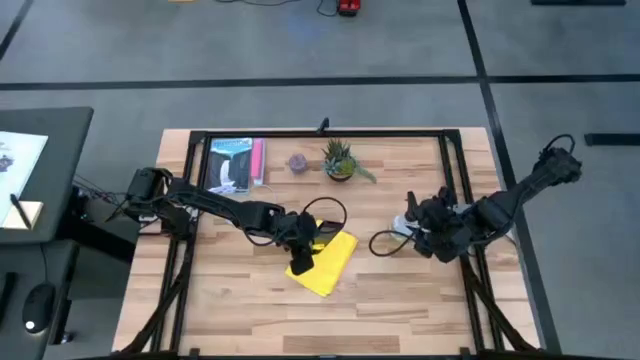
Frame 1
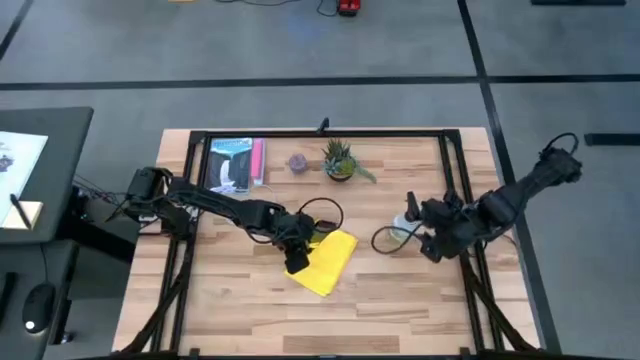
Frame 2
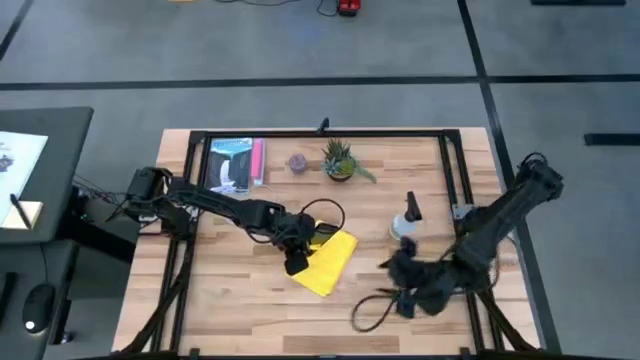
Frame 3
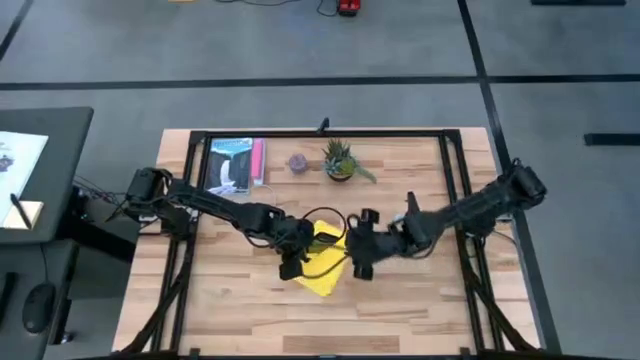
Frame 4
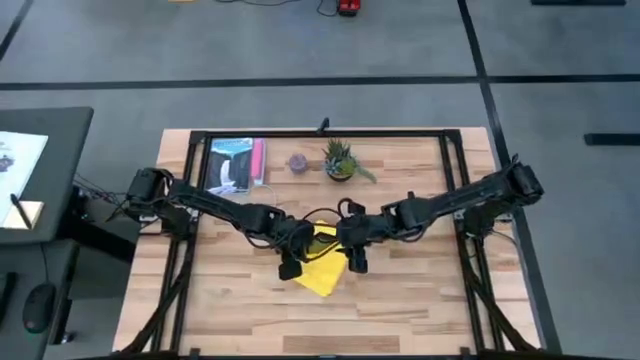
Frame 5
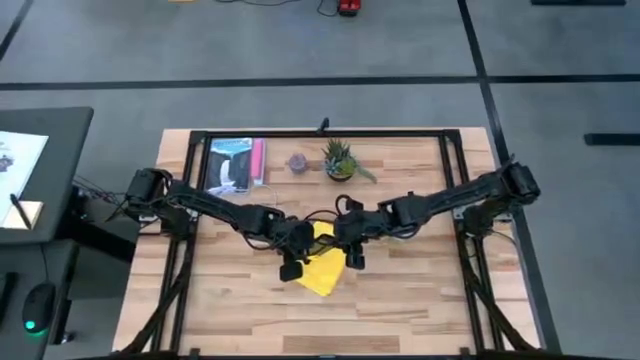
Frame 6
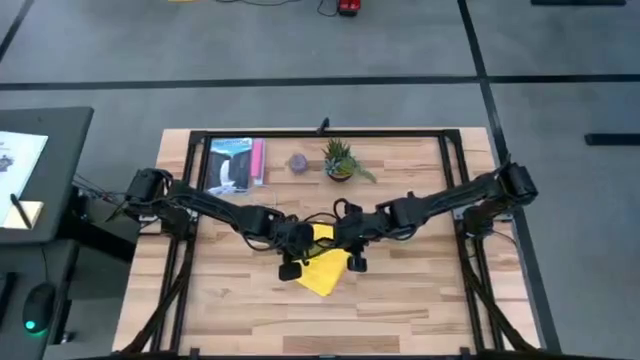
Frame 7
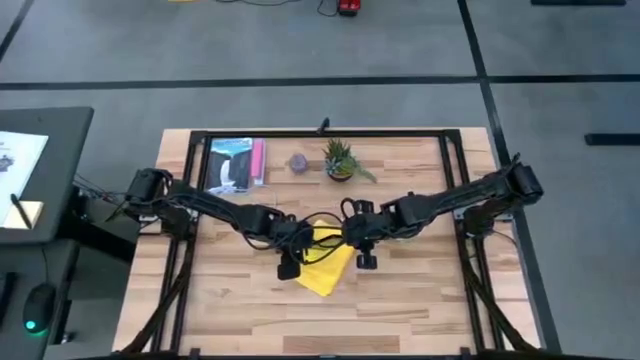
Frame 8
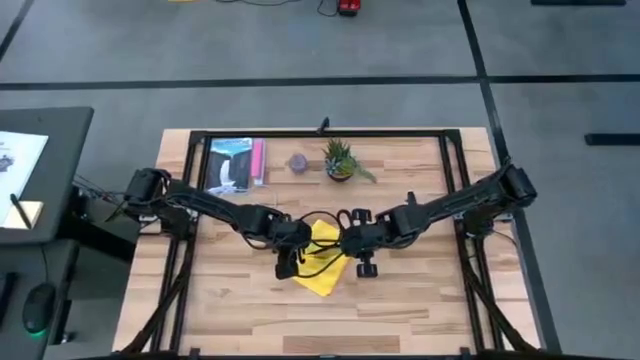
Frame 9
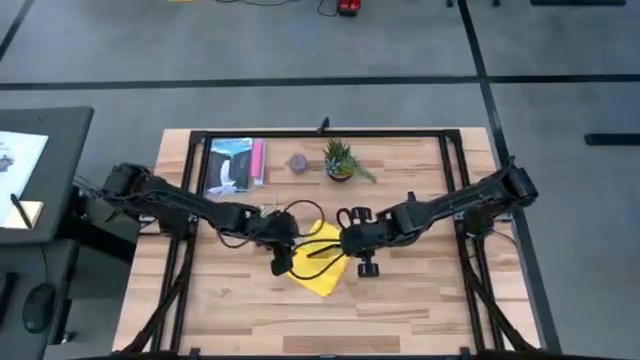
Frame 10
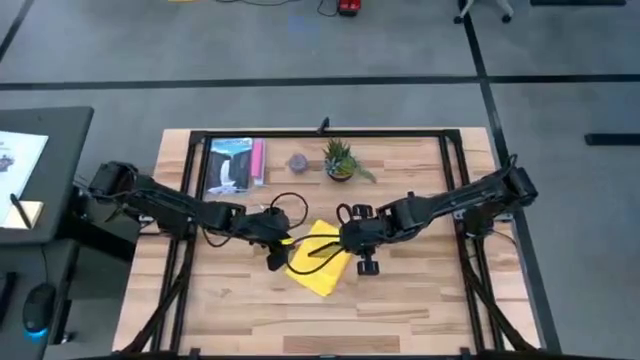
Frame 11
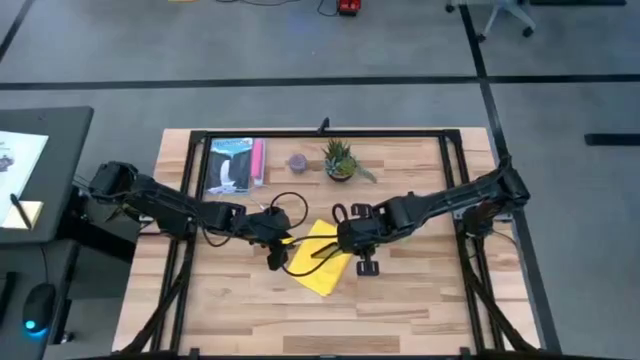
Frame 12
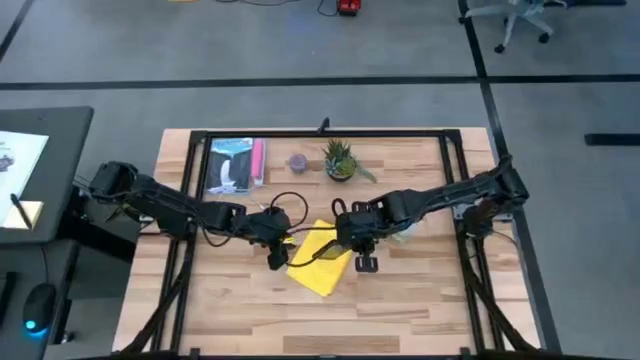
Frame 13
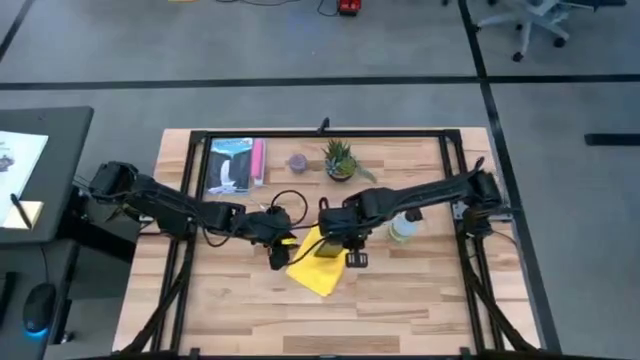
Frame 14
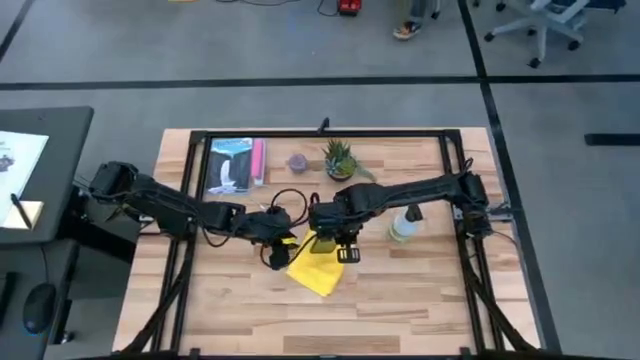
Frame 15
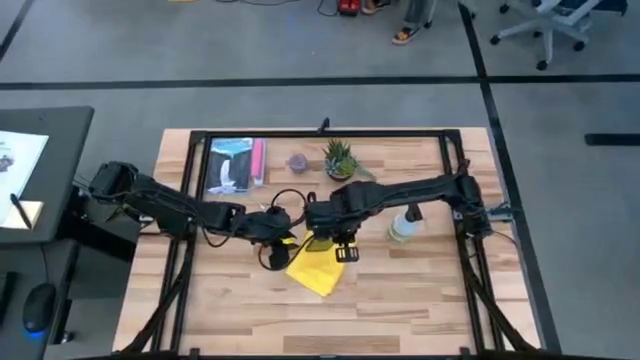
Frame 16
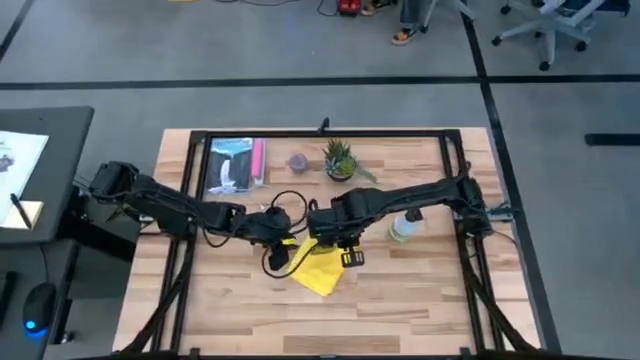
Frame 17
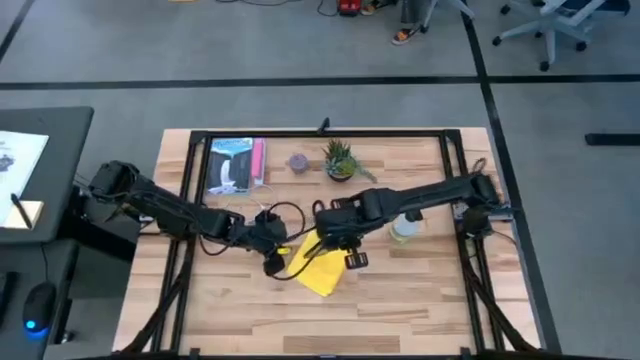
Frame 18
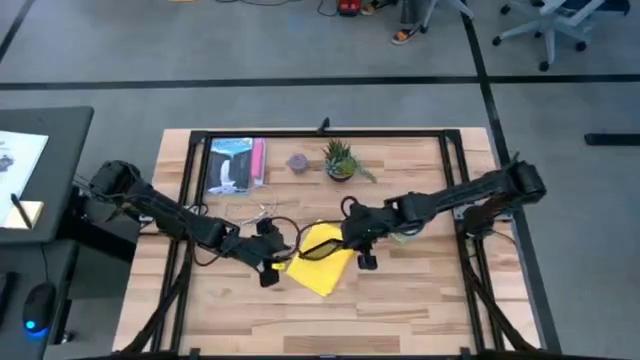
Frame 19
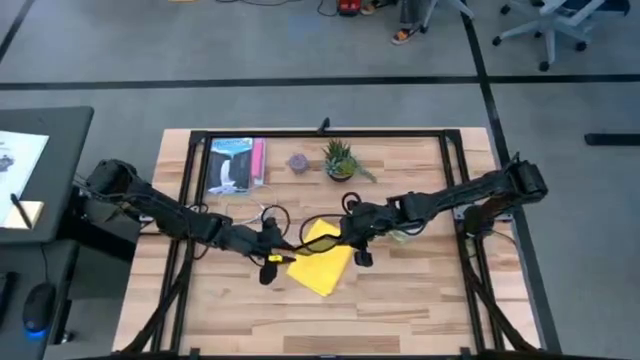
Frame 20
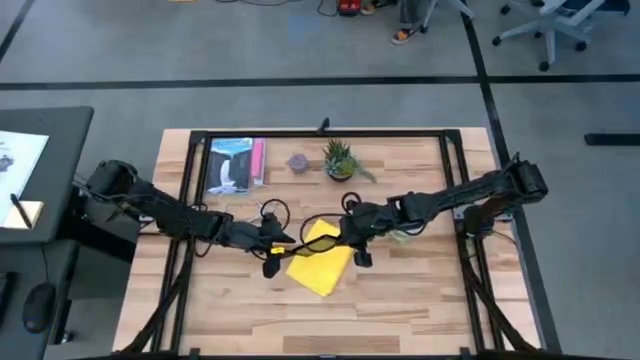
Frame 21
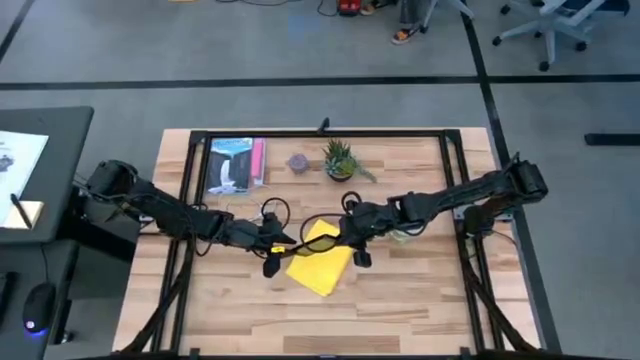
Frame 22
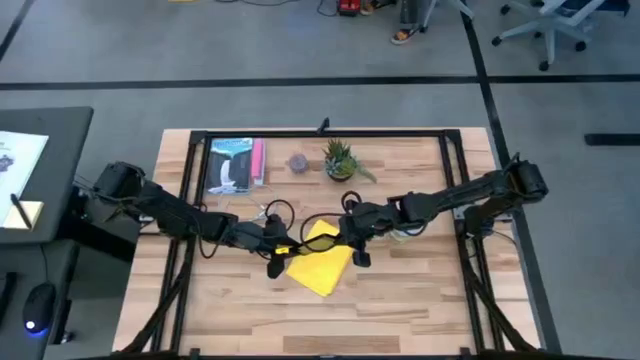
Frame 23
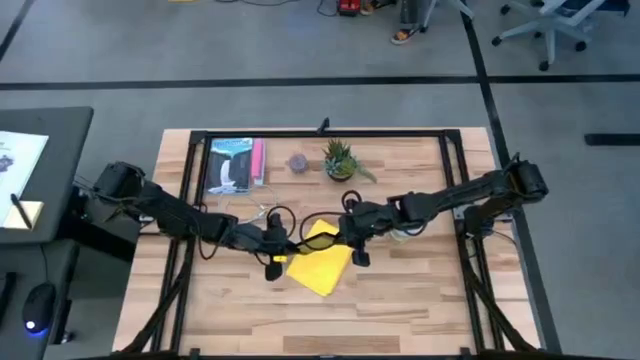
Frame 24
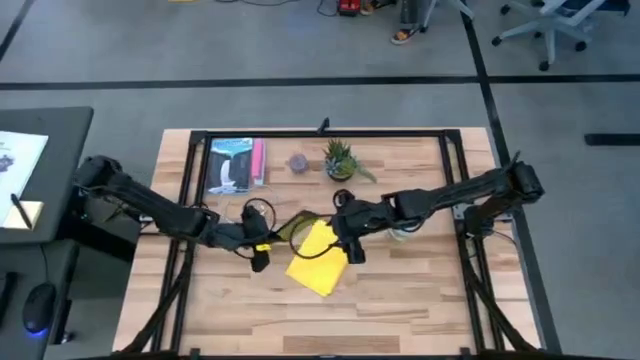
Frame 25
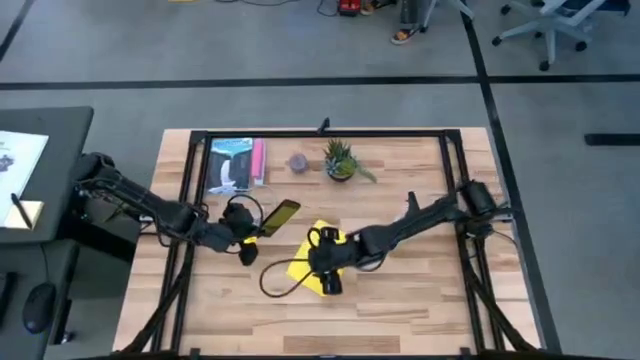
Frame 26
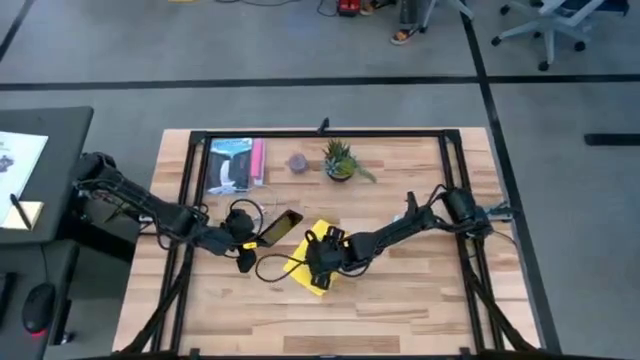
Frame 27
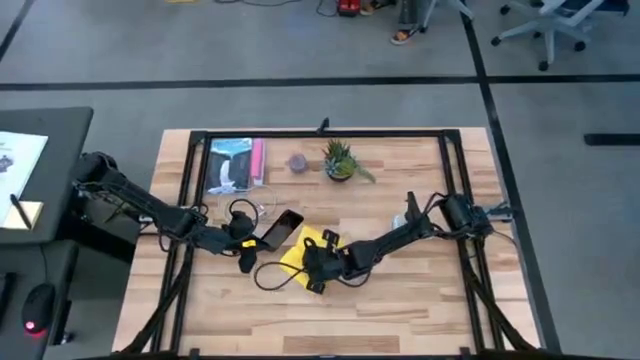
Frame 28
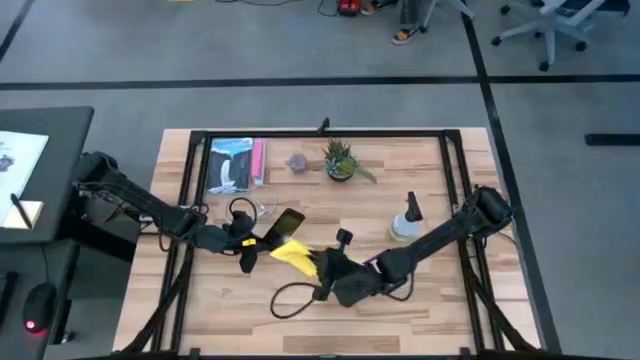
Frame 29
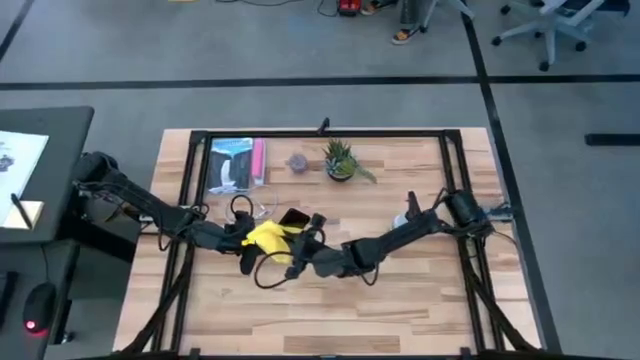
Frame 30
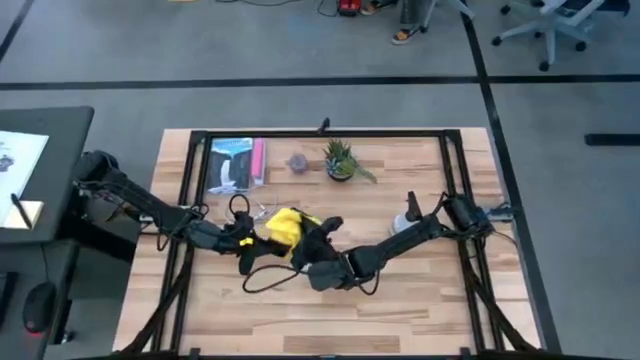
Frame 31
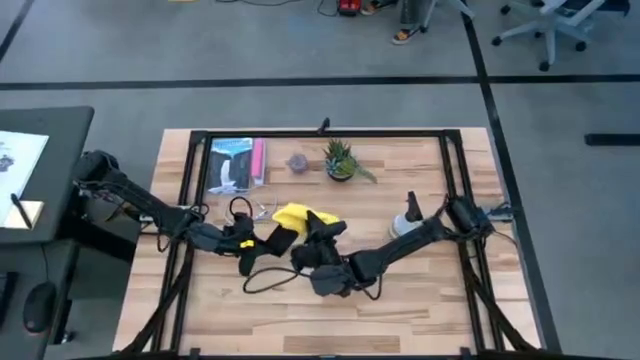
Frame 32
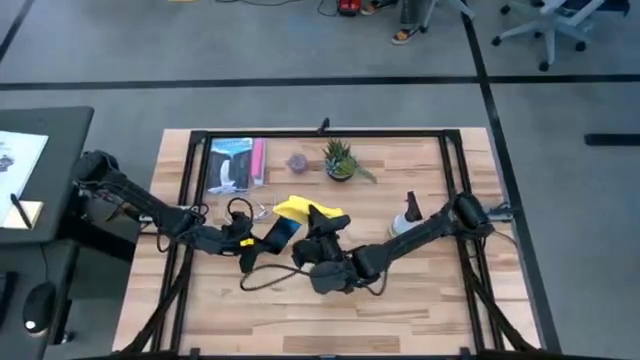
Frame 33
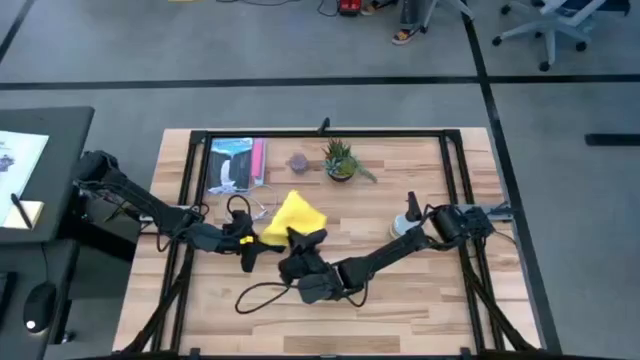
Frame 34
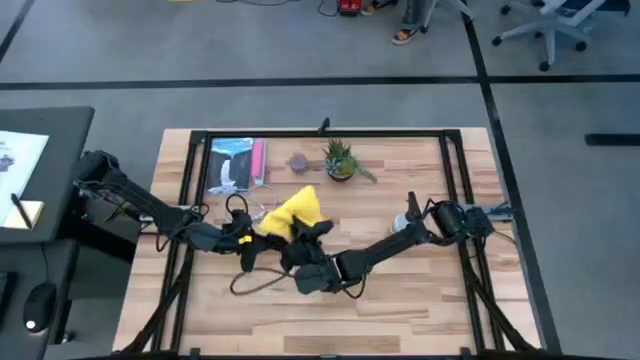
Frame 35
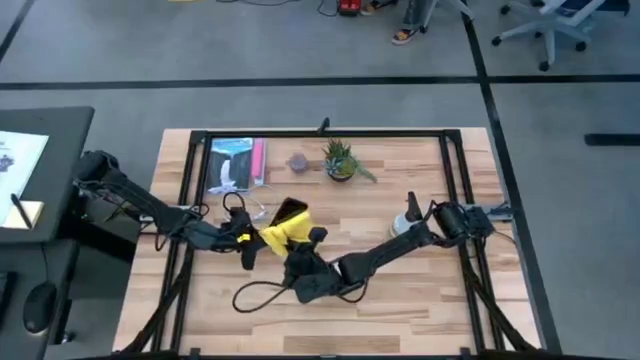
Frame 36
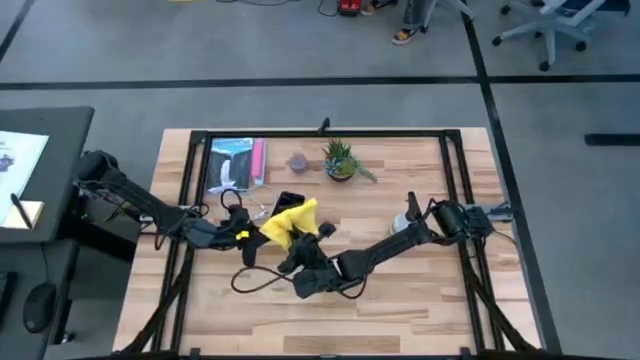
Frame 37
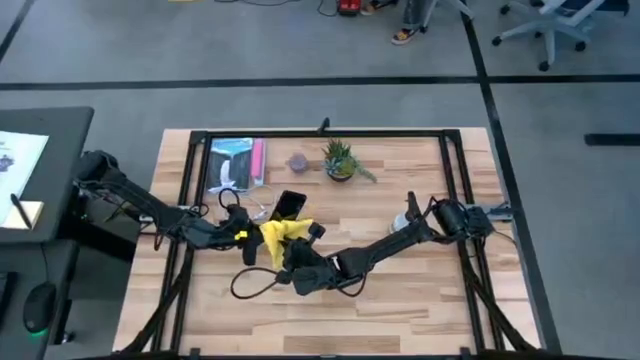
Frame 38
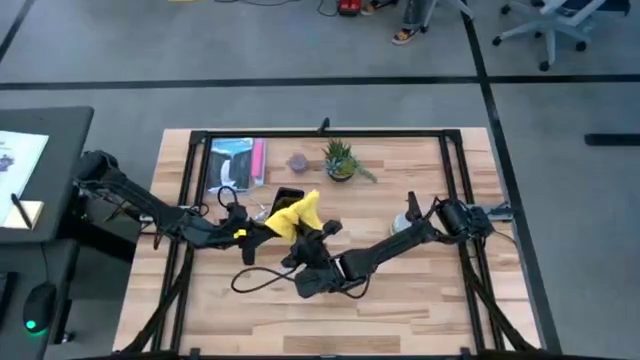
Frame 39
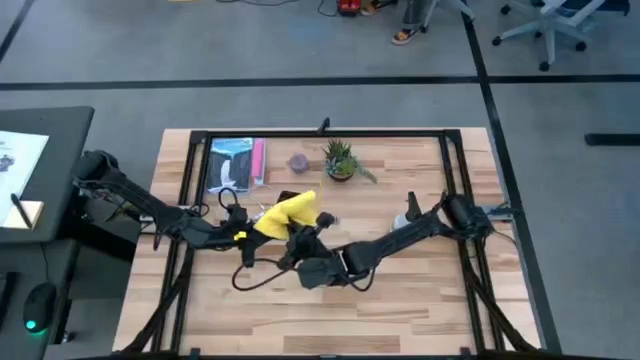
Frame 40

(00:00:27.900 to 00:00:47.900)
Task: Apply microfiber cloth
Wipe the front and back of the cellphone with the microfiber cloth

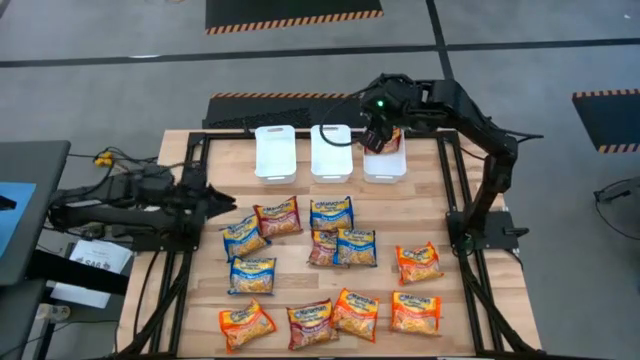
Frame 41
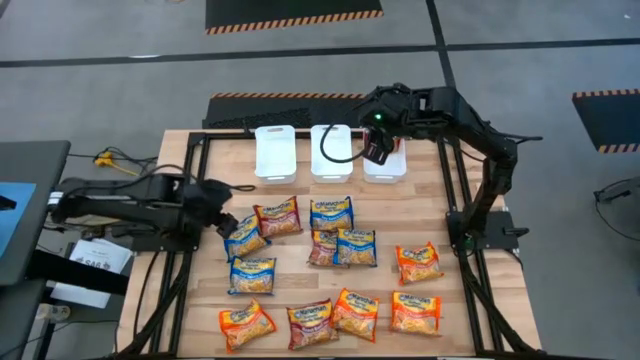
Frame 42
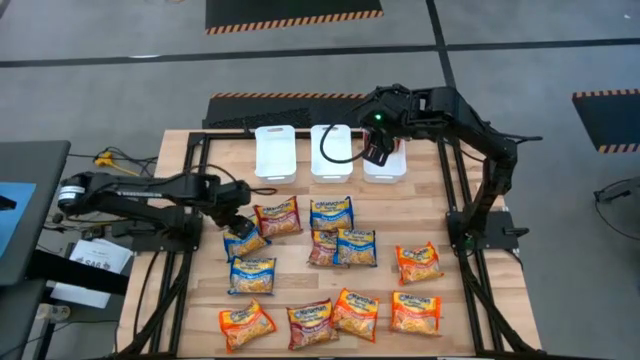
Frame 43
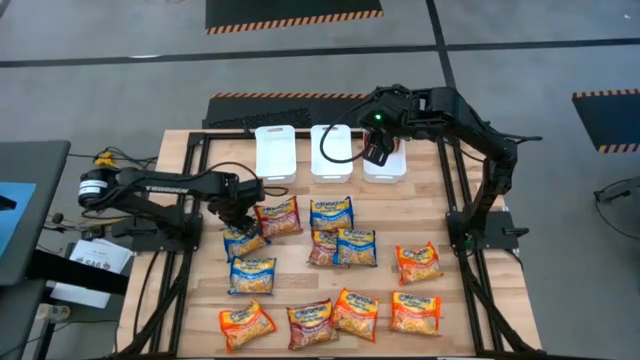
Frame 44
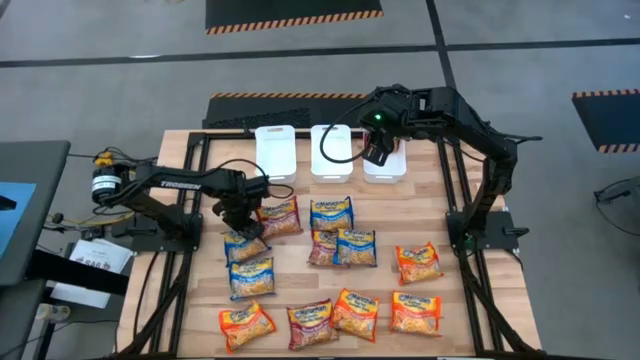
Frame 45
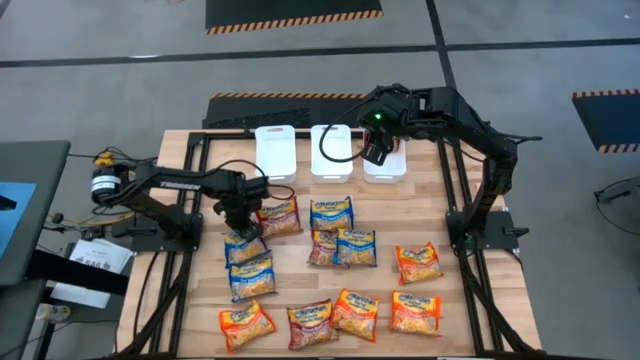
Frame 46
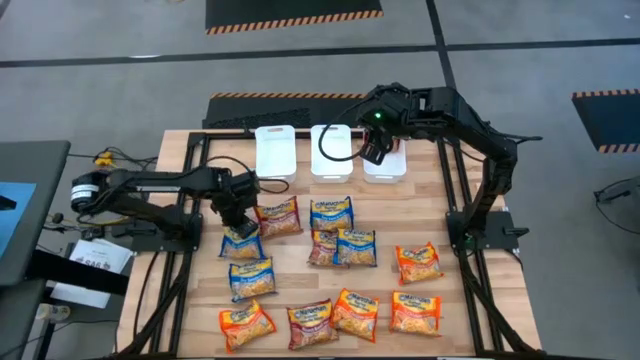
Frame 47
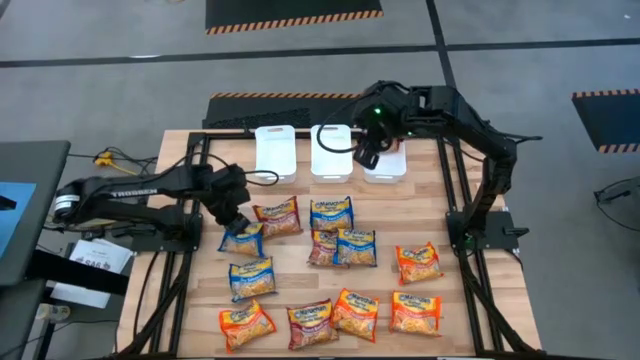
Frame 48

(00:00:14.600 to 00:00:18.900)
Task: Sort Maruchan noodles
Put the top left blue noodle soup pack into the middle white bin
